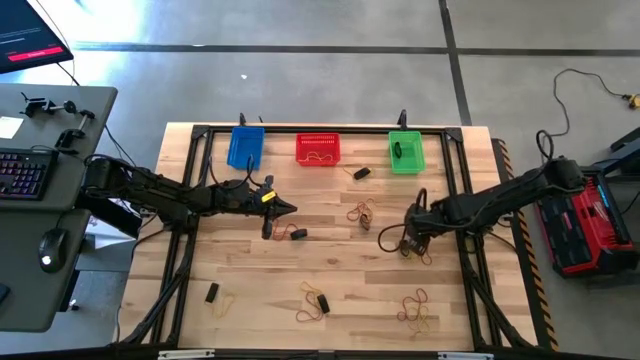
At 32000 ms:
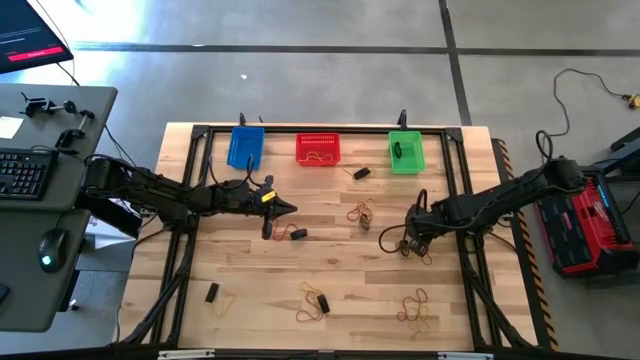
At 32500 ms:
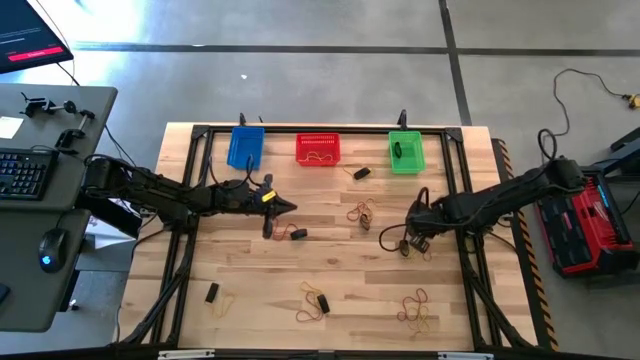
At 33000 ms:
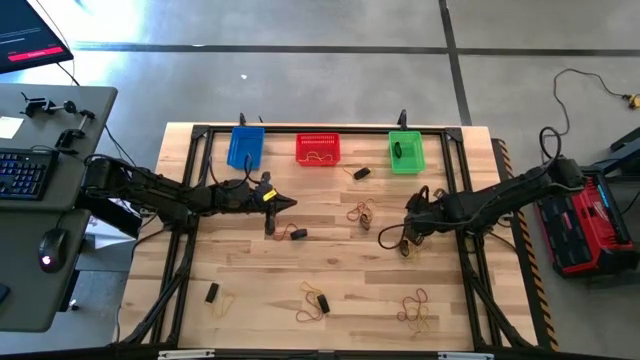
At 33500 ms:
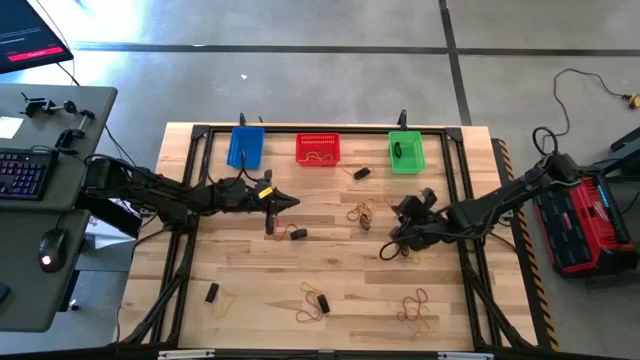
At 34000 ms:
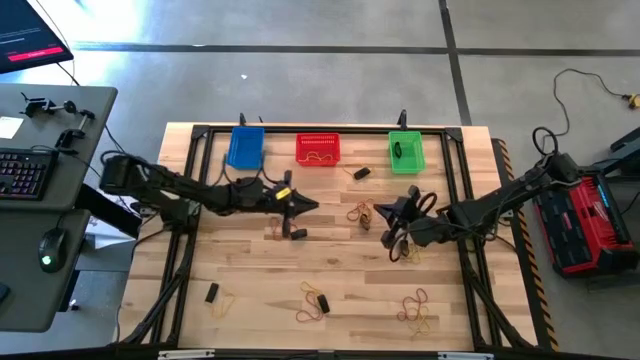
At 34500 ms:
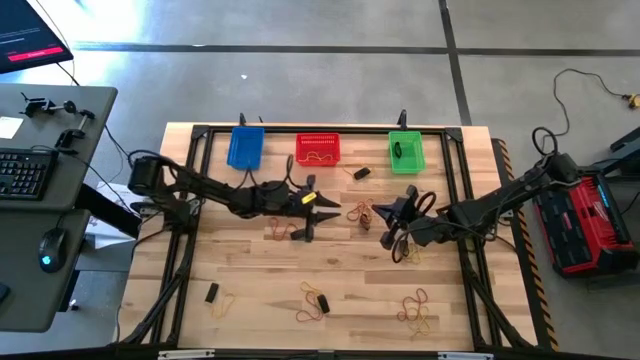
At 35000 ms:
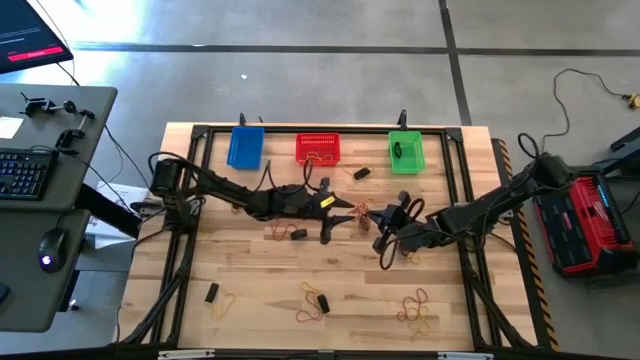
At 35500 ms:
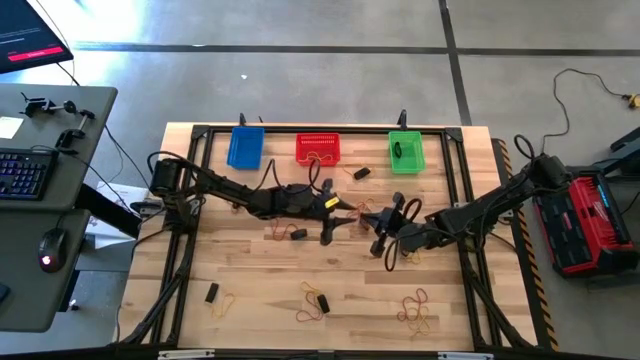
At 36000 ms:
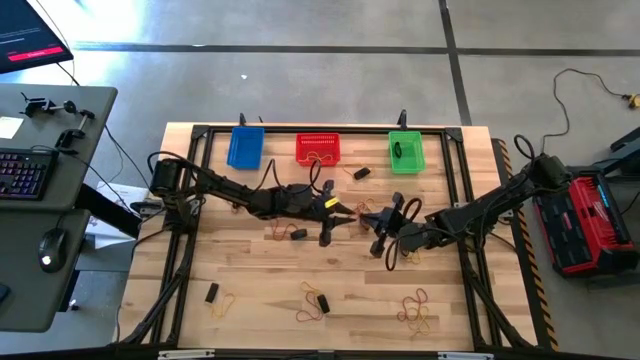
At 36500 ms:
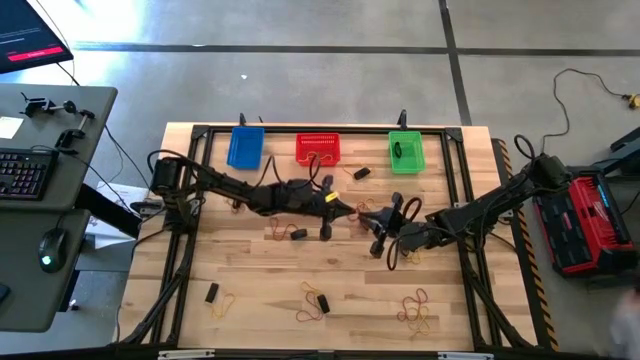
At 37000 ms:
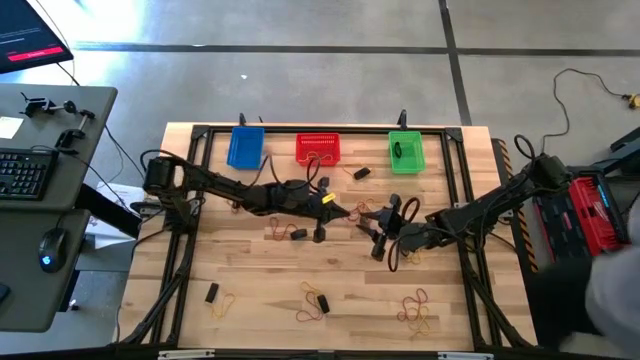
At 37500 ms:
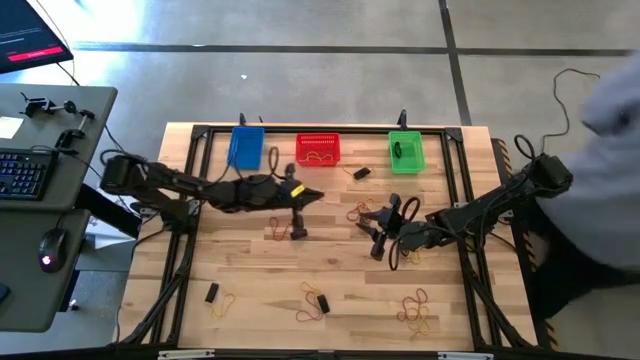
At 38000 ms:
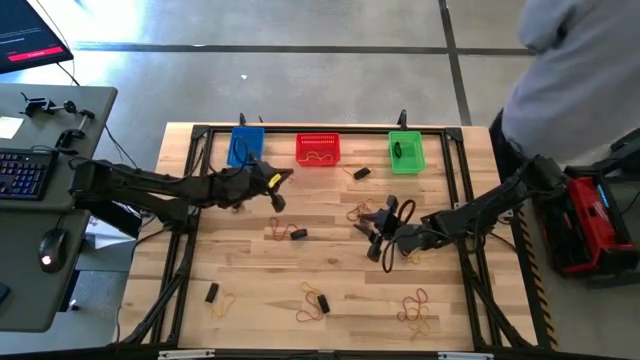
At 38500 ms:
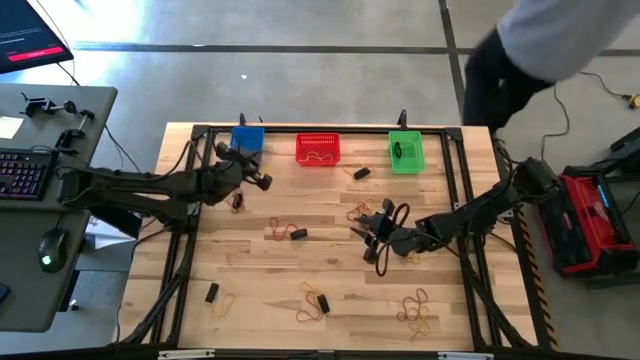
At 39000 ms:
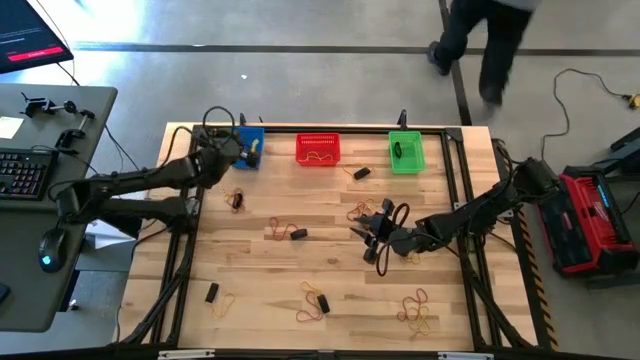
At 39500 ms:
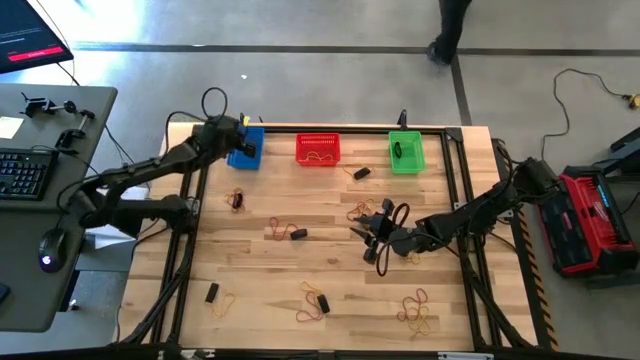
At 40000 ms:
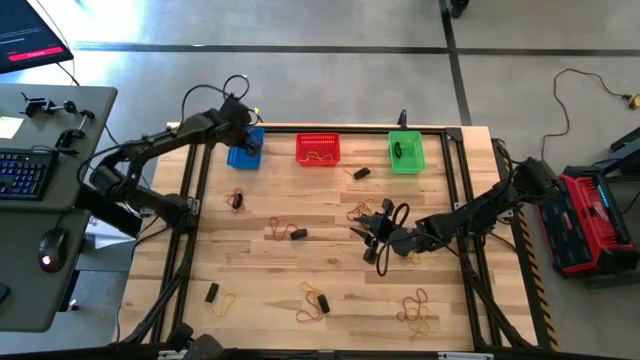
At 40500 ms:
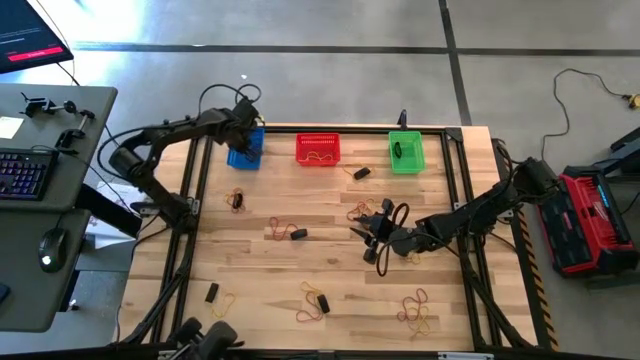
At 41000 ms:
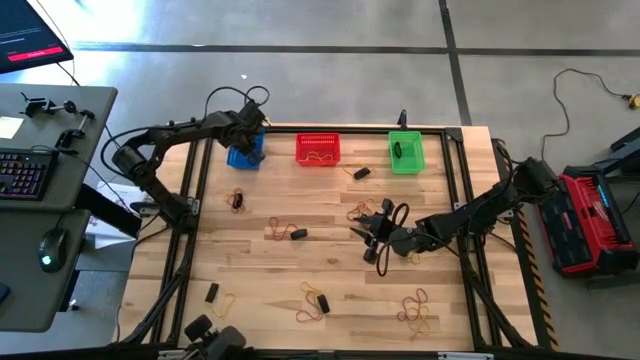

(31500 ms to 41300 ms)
Task: Sort rubber bands into baskets
Put the orange rubberband into the blue bin

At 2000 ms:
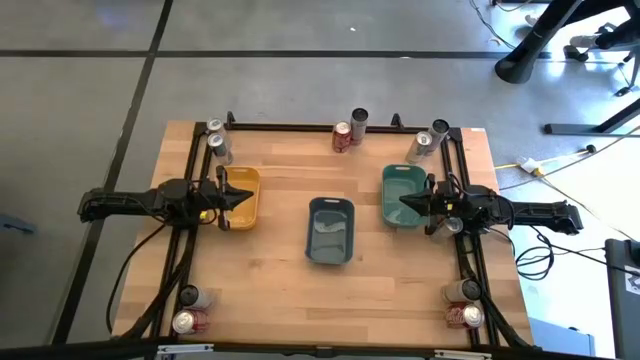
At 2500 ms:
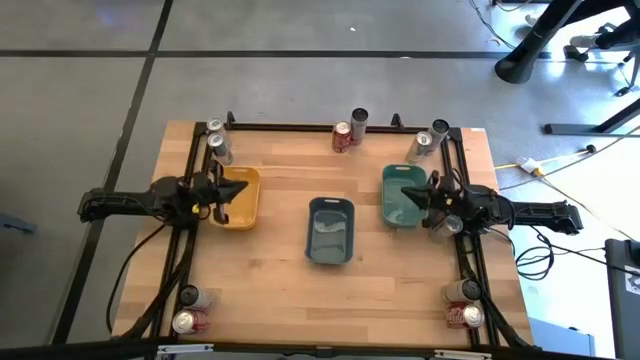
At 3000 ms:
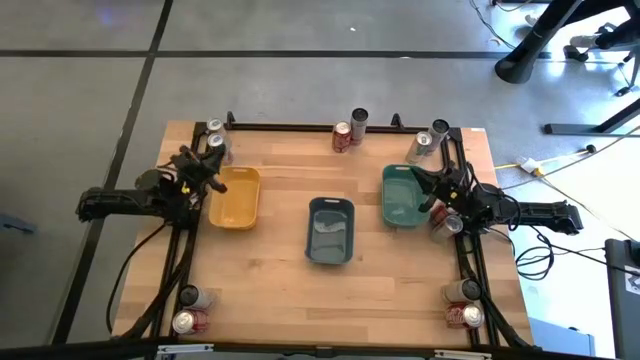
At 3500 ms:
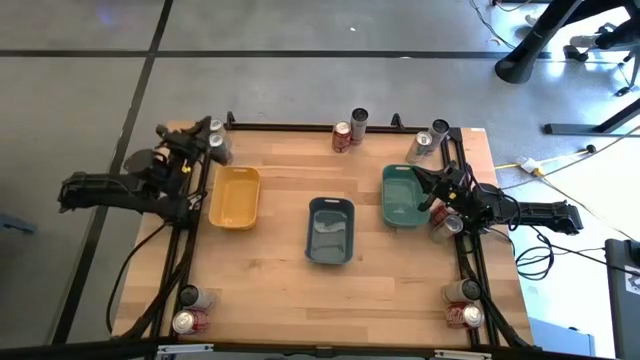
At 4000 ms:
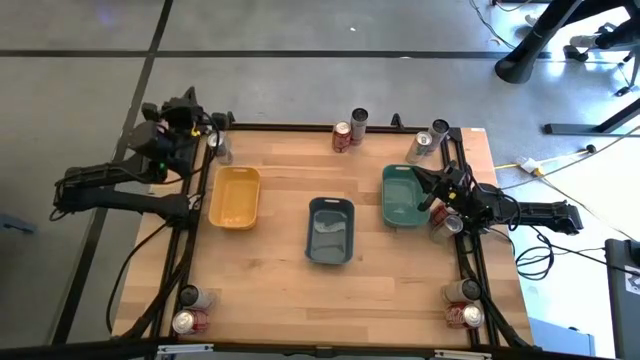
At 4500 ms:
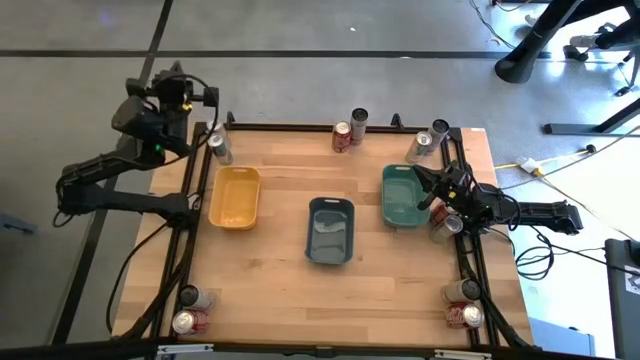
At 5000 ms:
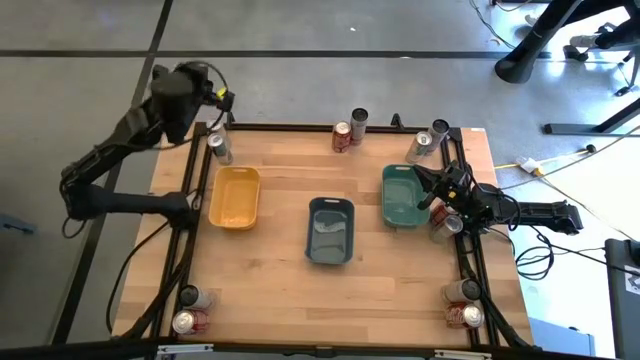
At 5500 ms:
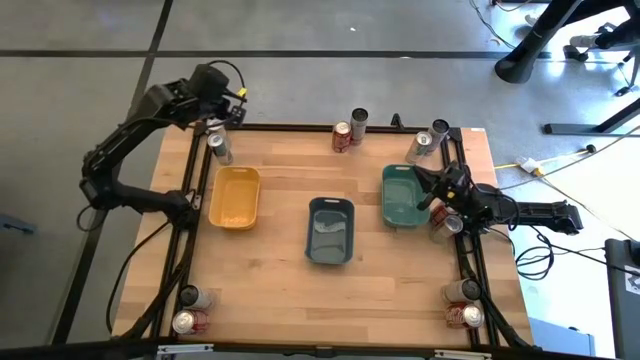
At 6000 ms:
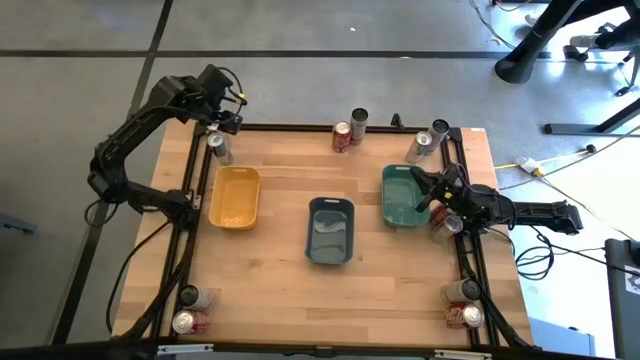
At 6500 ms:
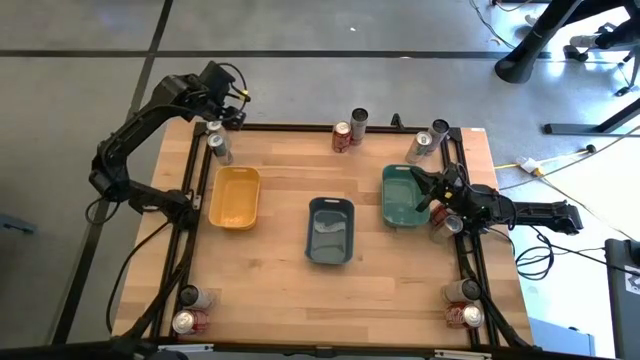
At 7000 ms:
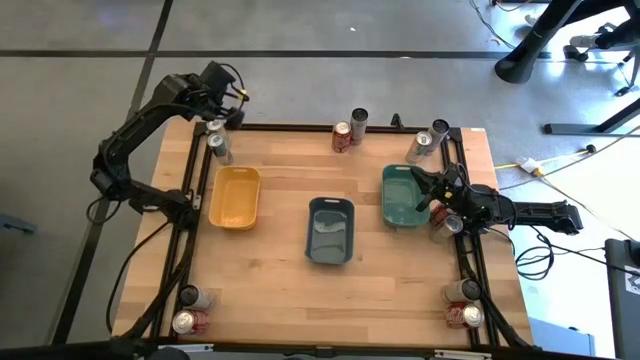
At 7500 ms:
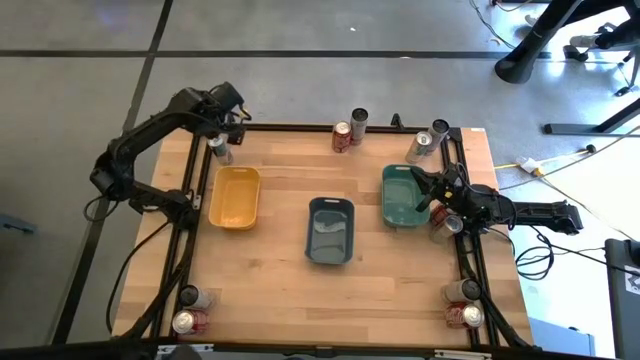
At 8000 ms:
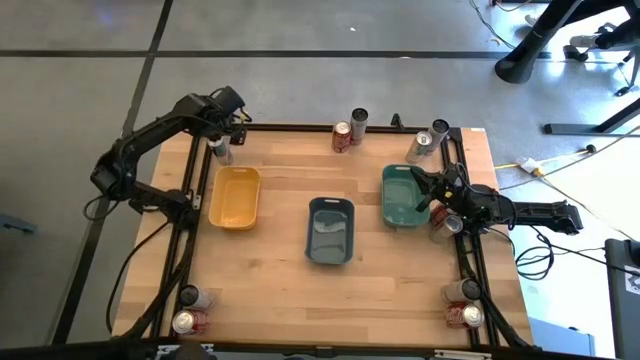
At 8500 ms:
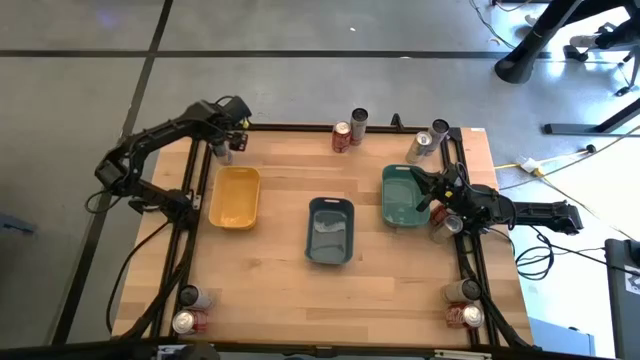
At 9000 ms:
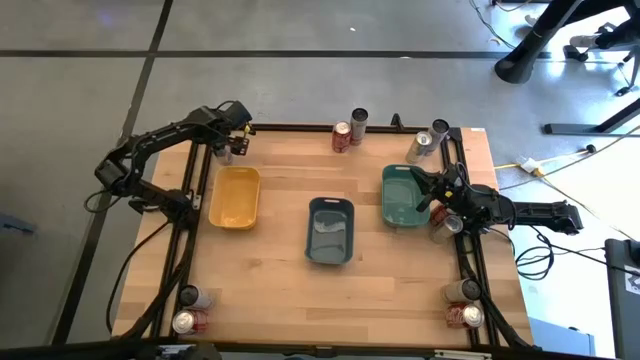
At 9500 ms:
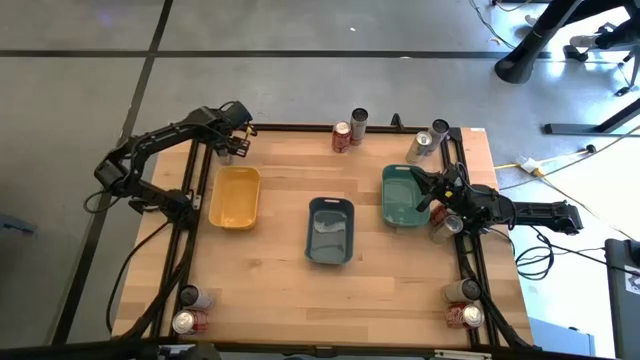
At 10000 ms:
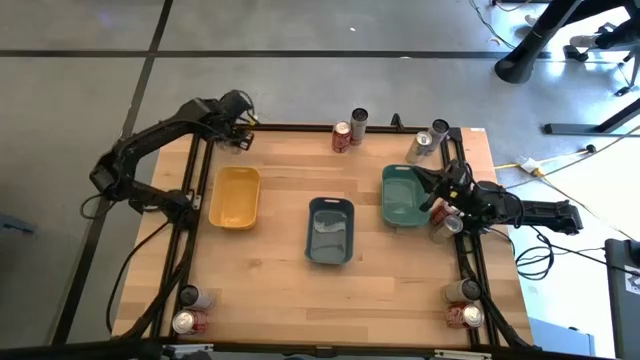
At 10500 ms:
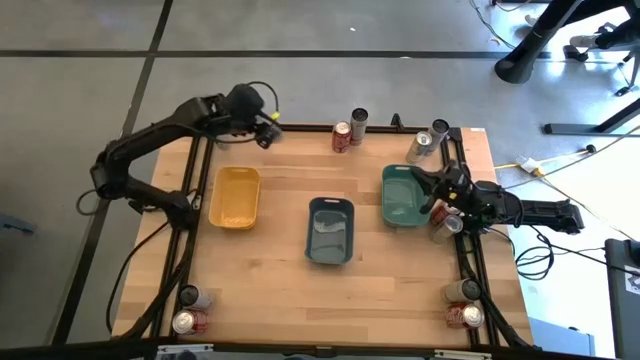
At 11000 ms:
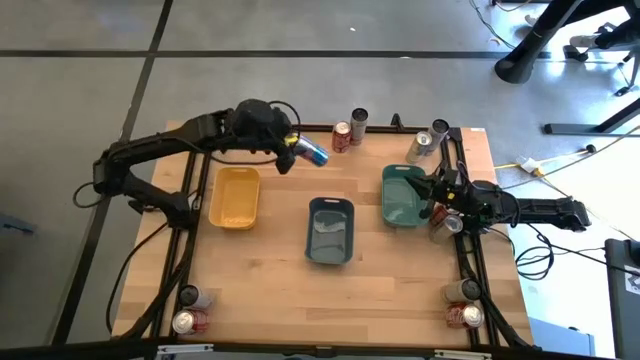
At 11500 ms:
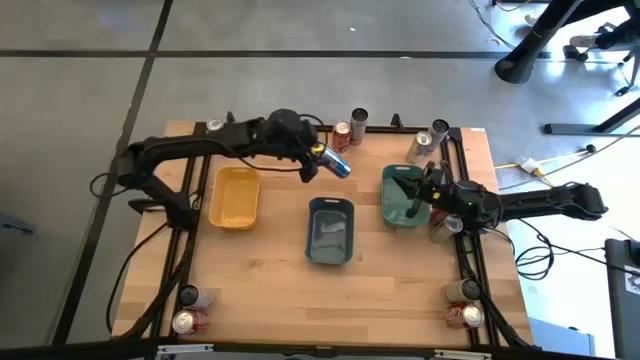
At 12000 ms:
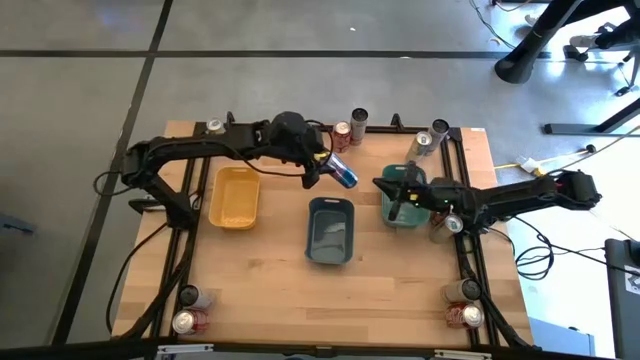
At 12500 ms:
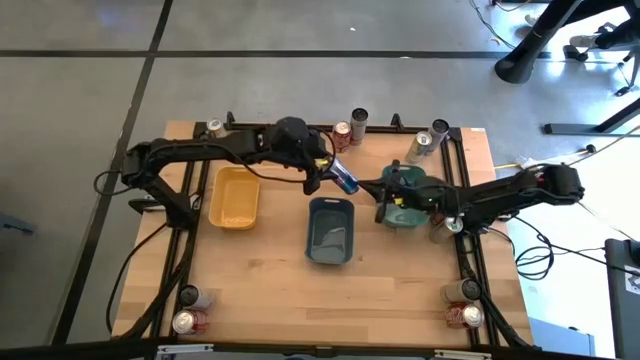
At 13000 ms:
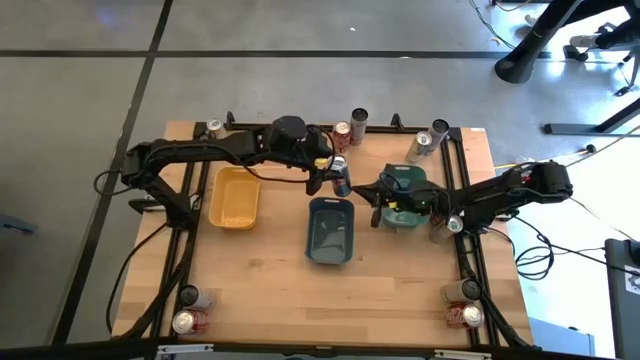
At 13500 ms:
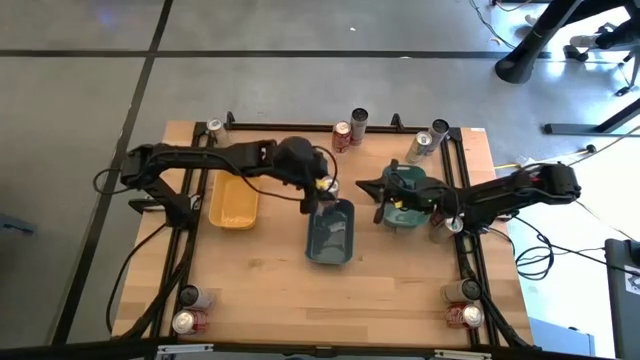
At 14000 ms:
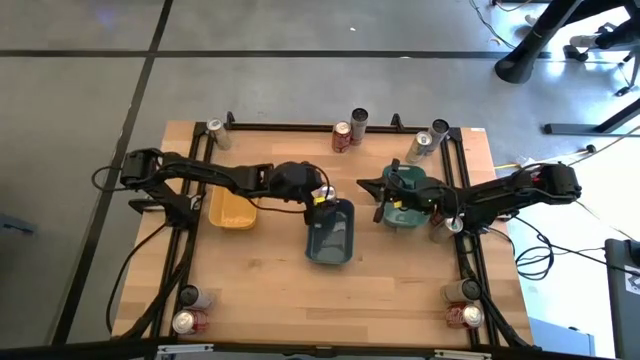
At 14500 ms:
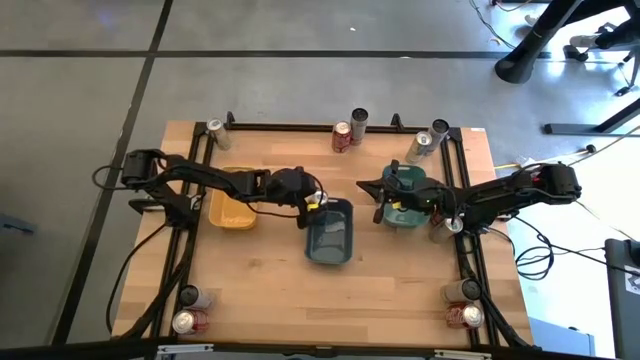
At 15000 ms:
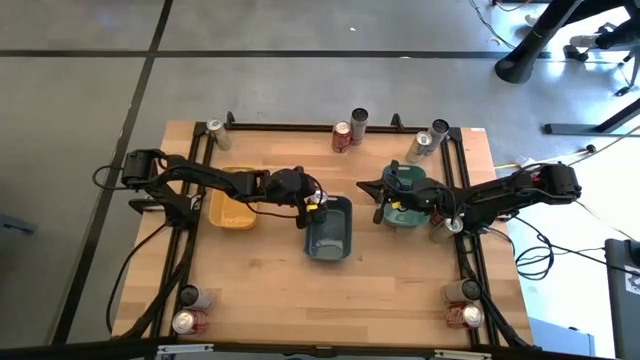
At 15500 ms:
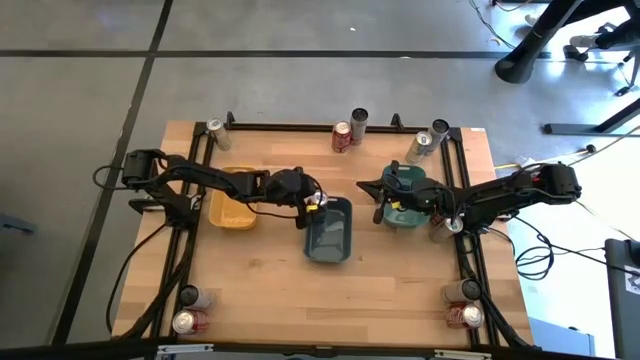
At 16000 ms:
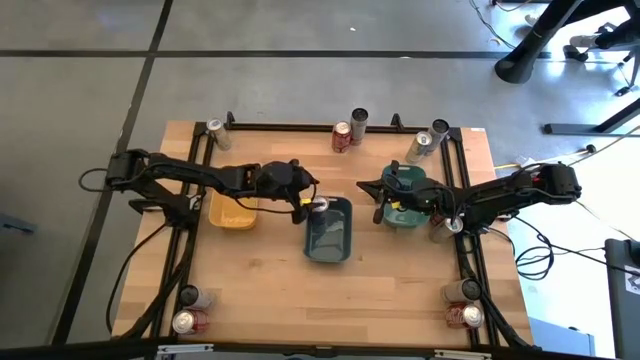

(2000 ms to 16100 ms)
Task: Sort soda cans
Put the blue soda can into blue bin
